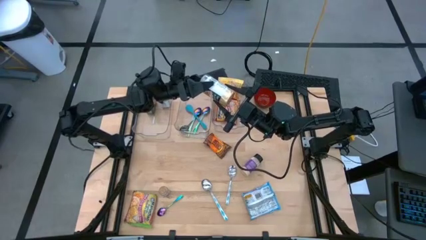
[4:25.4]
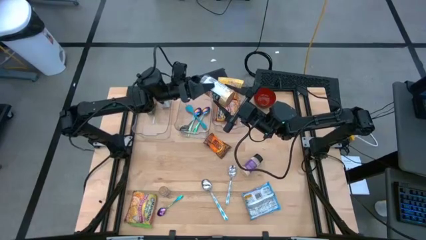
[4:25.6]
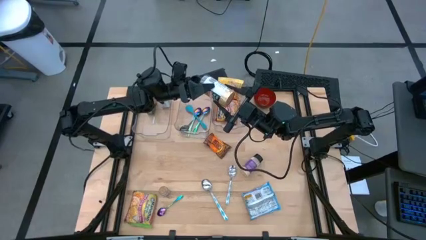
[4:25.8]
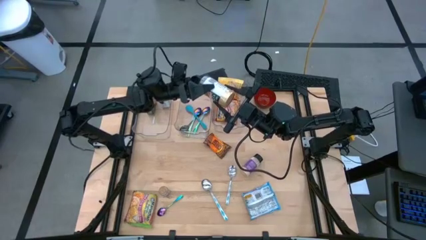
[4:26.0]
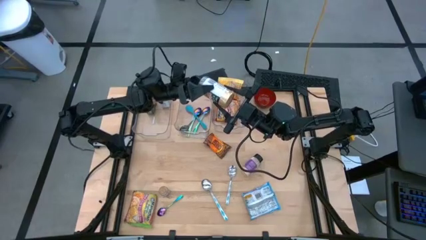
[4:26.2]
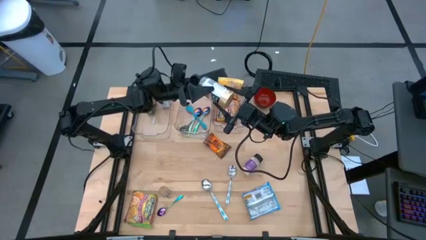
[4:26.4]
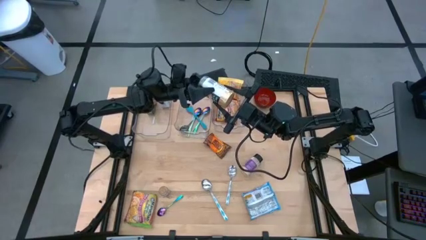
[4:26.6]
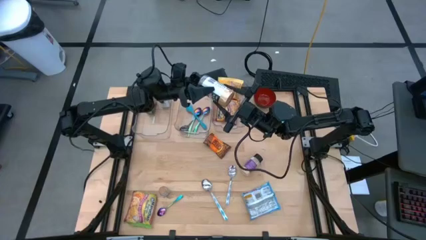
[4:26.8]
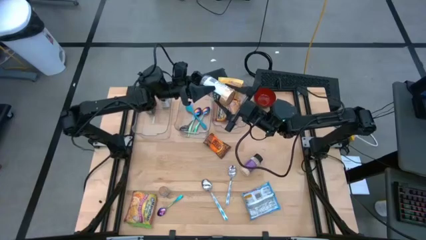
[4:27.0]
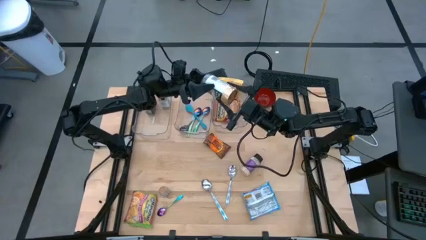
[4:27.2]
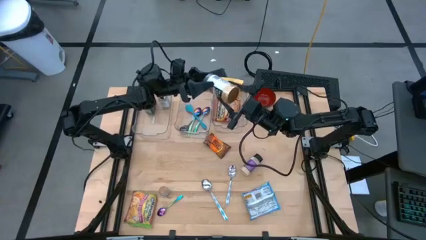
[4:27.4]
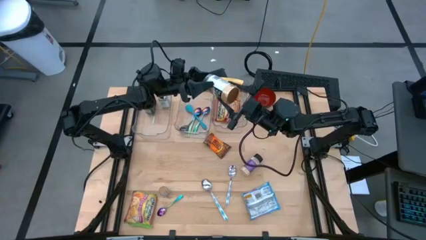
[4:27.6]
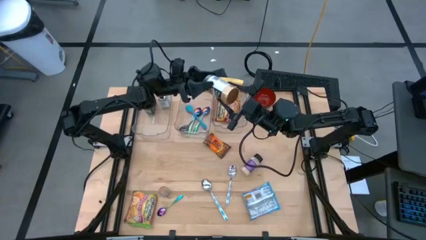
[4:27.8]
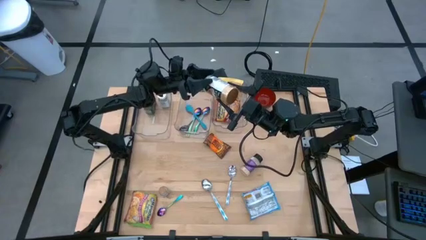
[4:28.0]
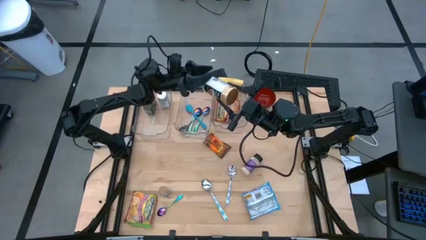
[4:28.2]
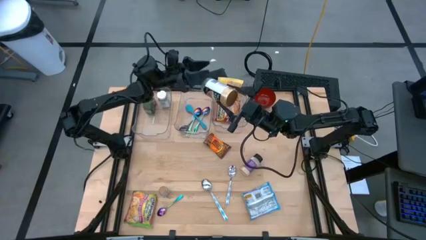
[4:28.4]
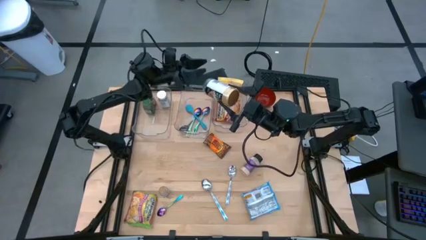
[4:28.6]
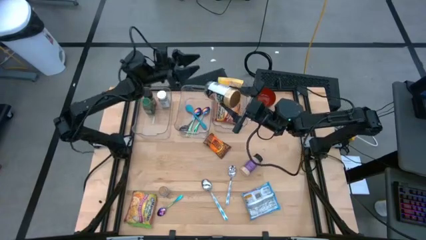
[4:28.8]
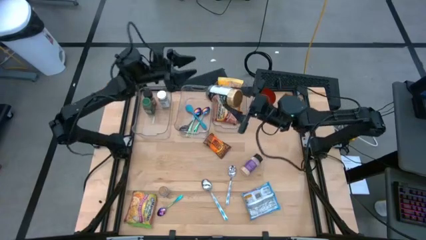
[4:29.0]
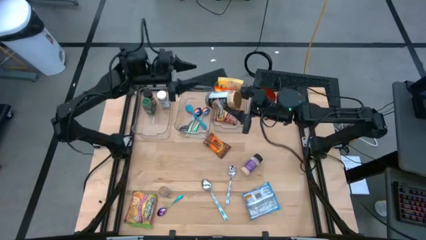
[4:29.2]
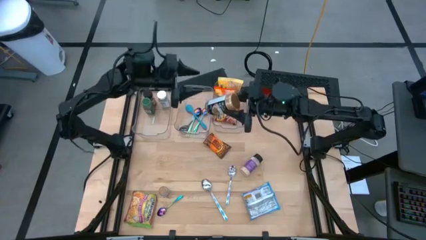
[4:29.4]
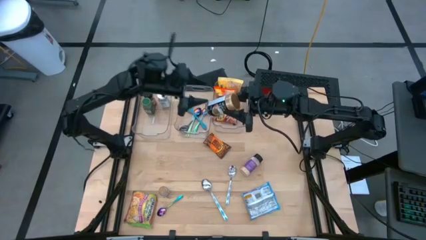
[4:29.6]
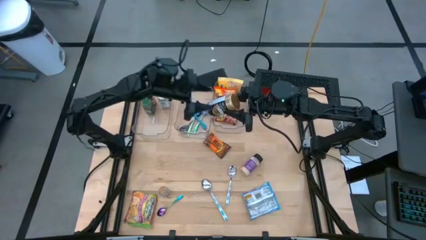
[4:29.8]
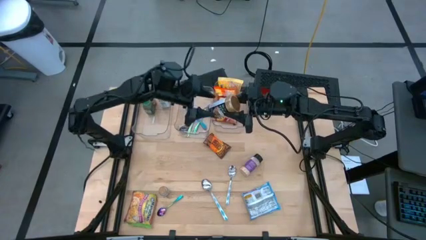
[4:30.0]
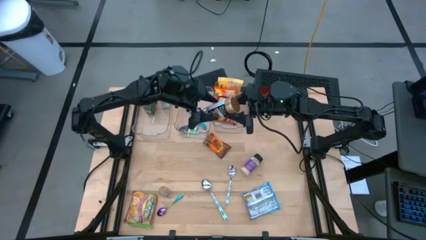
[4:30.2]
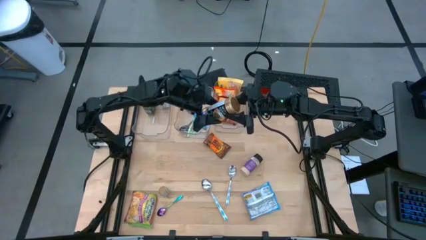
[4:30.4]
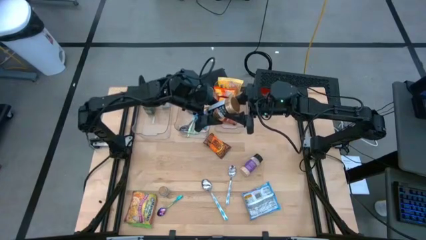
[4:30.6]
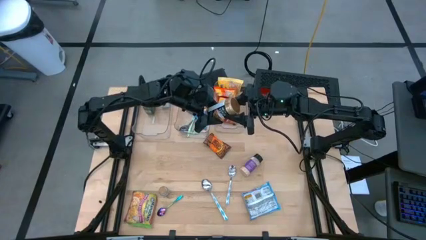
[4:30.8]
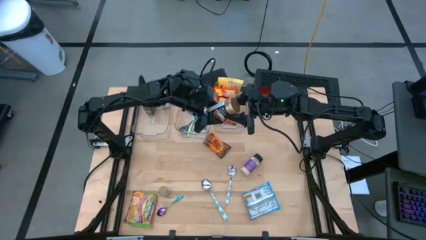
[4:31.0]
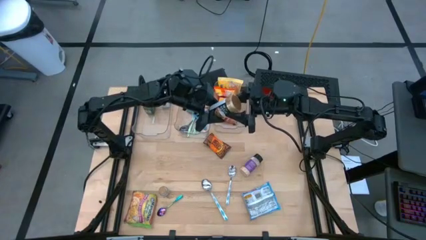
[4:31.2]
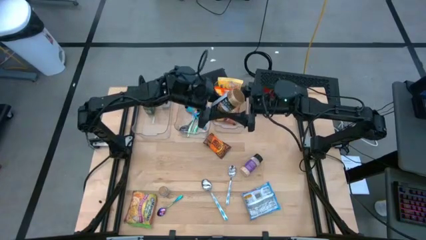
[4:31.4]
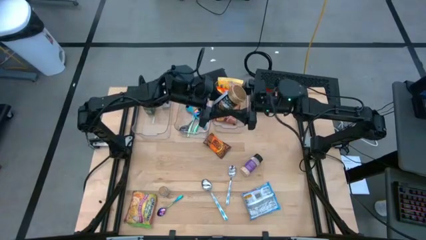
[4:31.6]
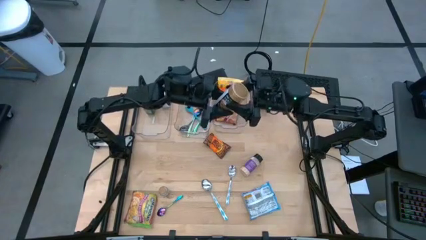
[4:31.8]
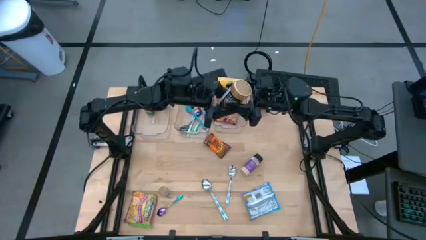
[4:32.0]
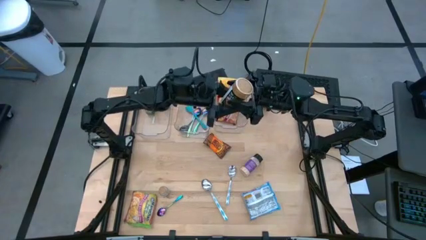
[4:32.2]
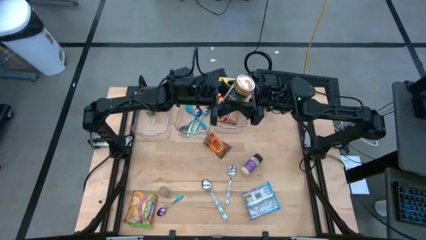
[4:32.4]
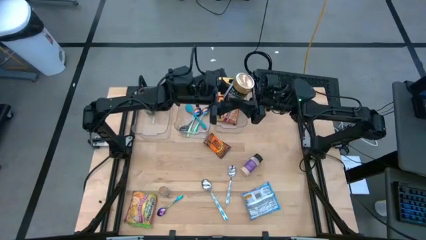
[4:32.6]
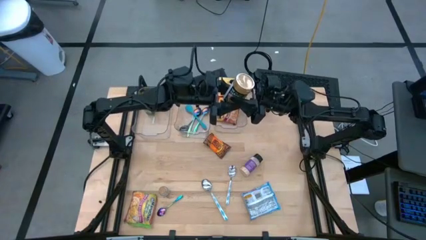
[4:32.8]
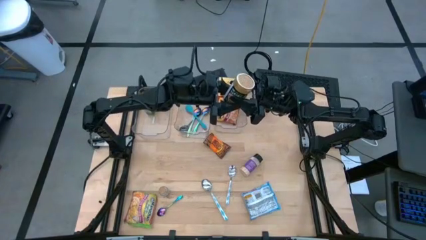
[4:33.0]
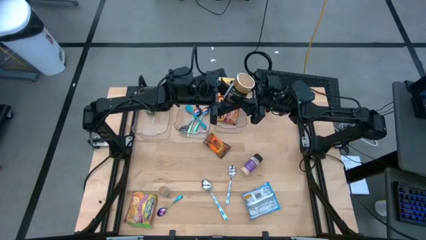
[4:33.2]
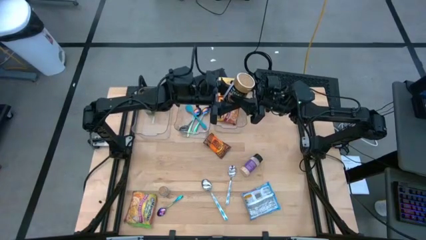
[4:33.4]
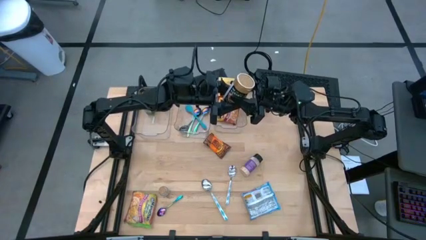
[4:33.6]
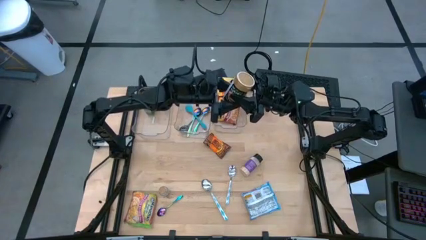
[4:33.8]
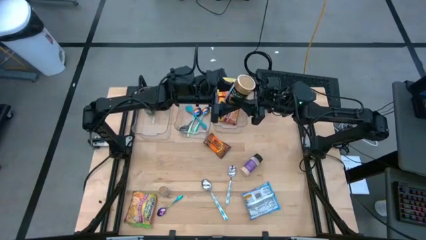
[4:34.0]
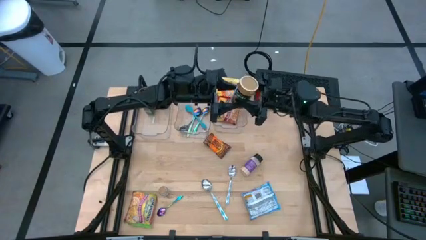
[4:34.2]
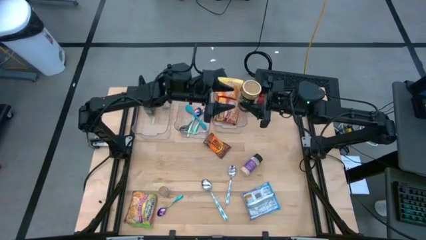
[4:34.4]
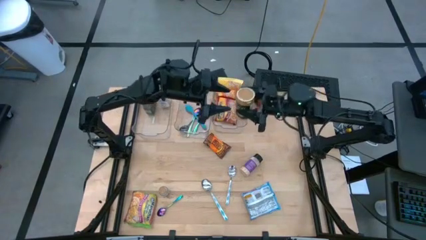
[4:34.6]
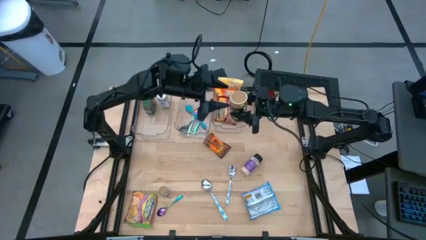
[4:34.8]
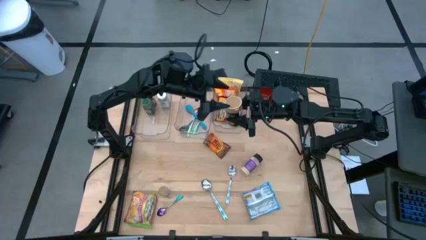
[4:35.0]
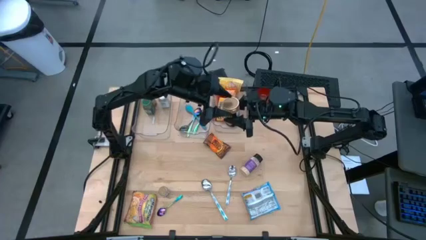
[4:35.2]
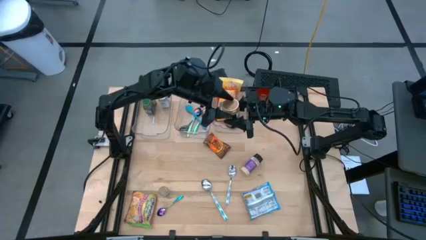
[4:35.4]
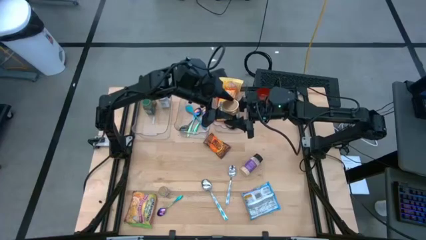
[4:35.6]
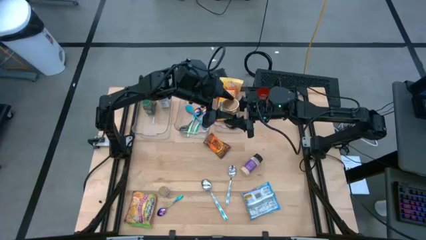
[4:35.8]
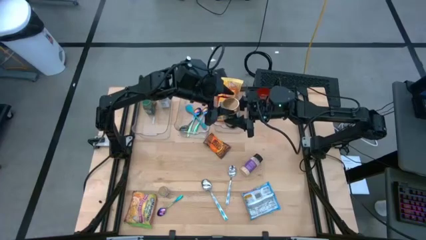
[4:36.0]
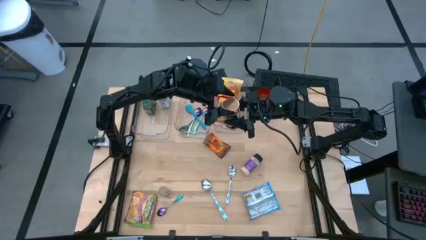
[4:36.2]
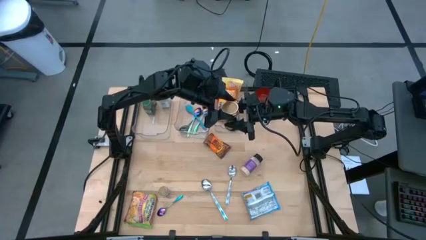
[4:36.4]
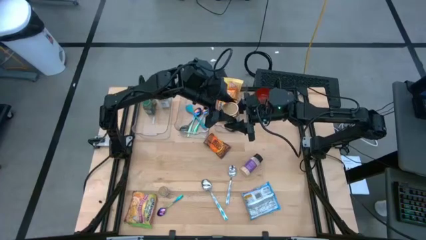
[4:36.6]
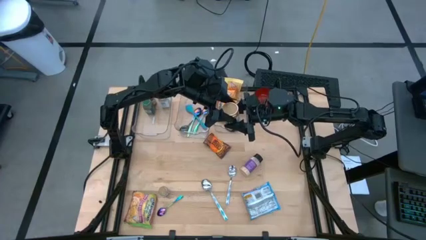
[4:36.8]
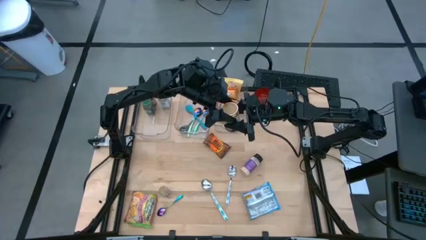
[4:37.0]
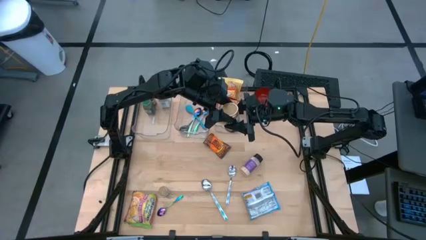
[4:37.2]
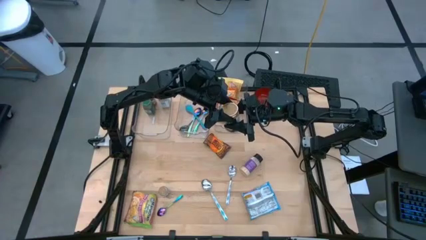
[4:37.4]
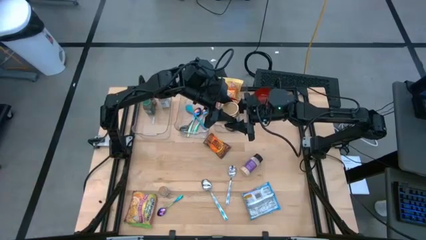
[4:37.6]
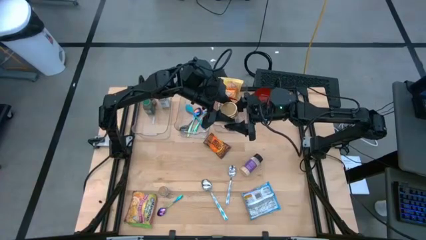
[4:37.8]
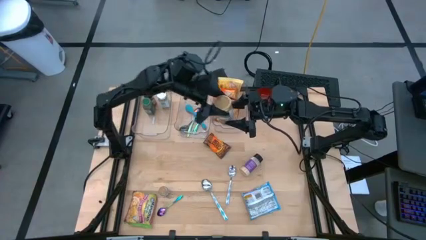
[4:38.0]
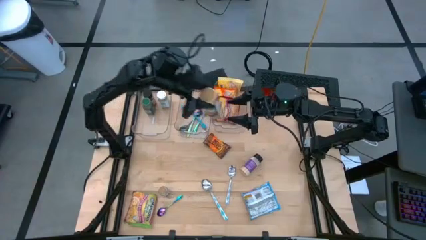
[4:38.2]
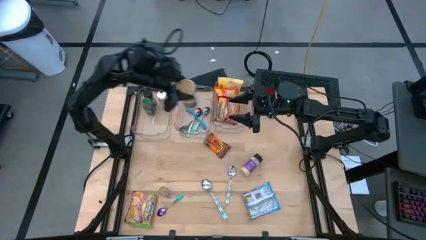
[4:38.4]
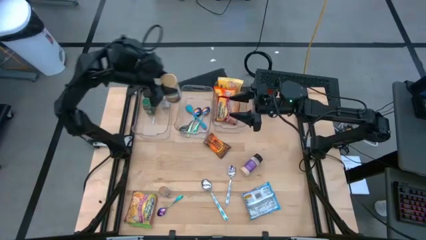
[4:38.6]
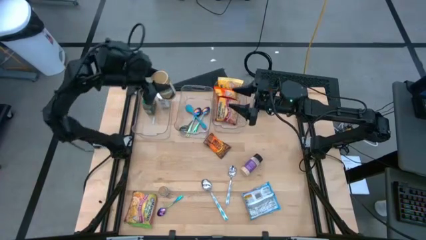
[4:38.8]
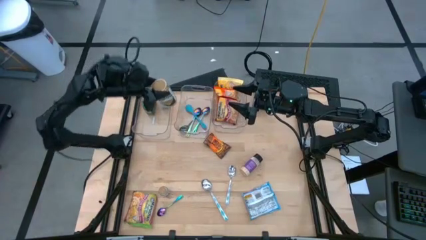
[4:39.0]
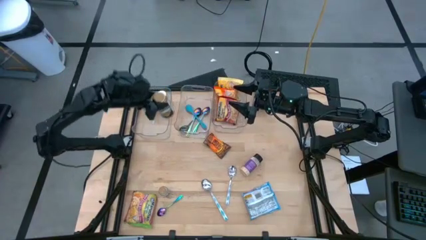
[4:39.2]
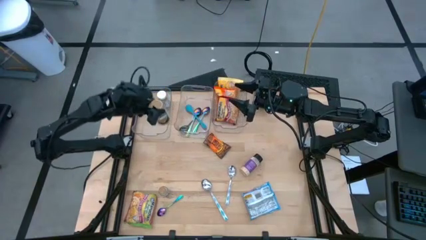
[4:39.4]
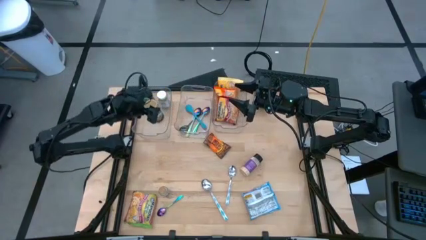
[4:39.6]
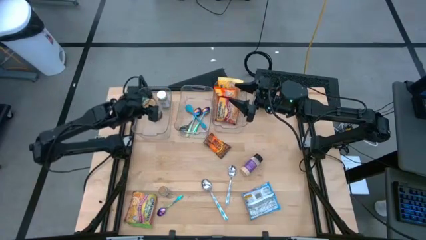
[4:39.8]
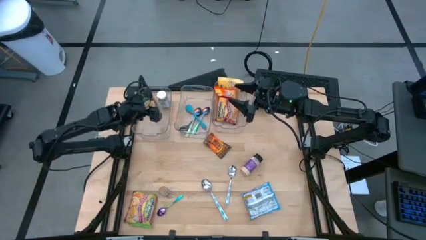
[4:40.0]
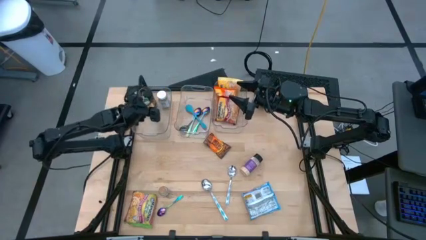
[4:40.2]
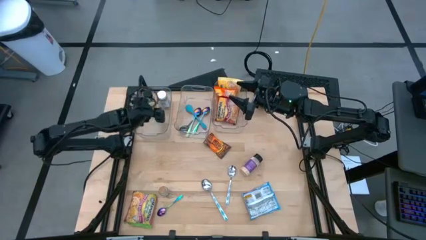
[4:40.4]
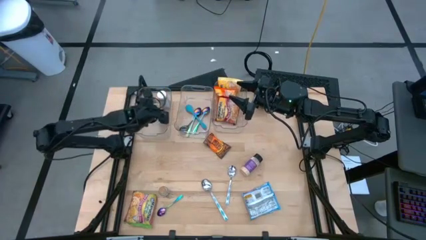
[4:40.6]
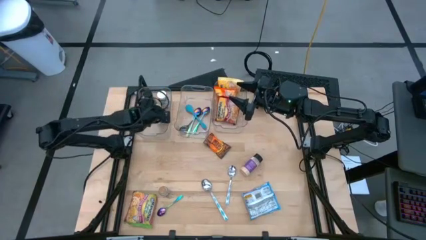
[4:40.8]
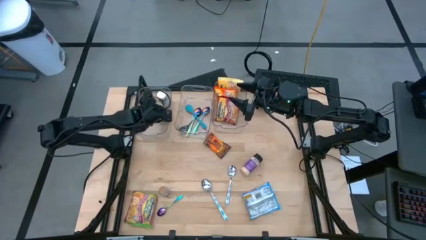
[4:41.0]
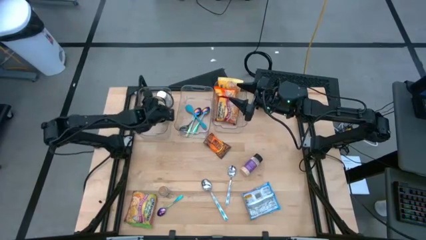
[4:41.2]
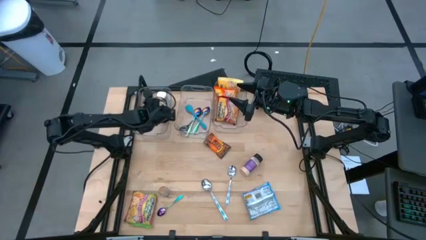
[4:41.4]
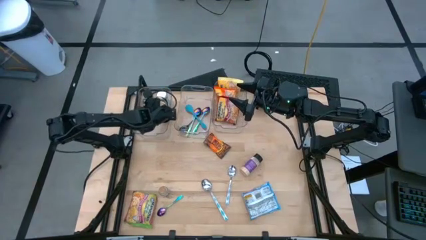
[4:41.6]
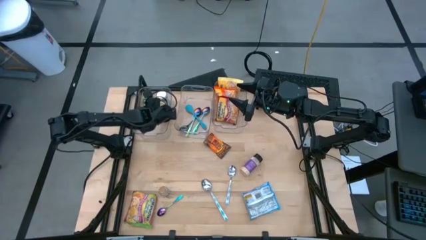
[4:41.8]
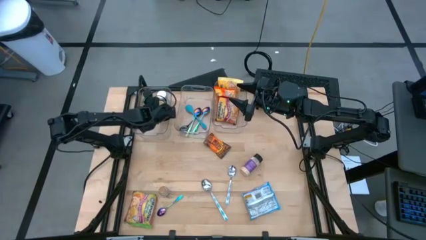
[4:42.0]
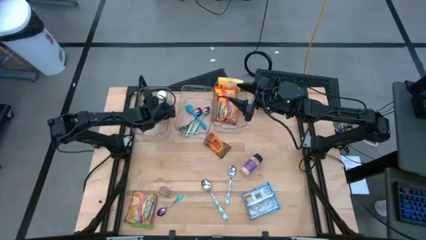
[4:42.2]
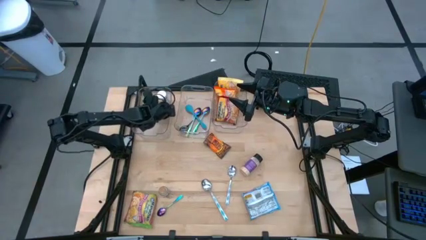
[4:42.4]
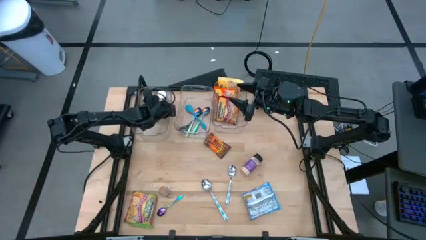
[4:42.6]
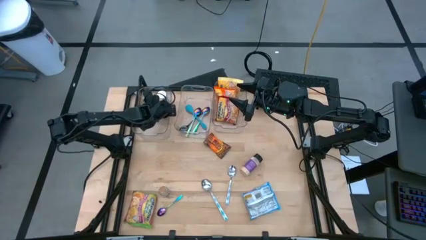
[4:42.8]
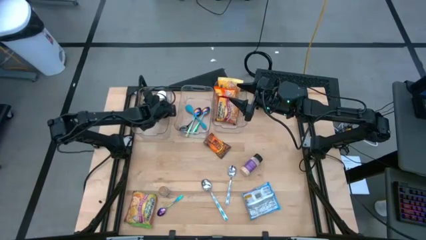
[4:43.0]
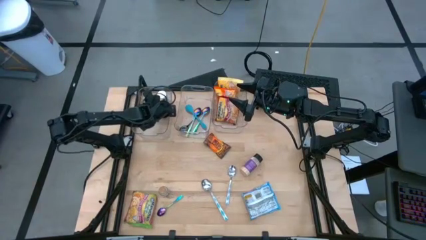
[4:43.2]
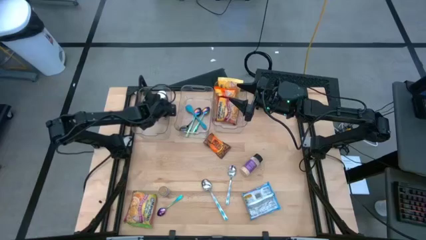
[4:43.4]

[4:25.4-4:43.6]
Task: Pick & Place Food Item
Put the gold spice bottle into the left transparent bin
